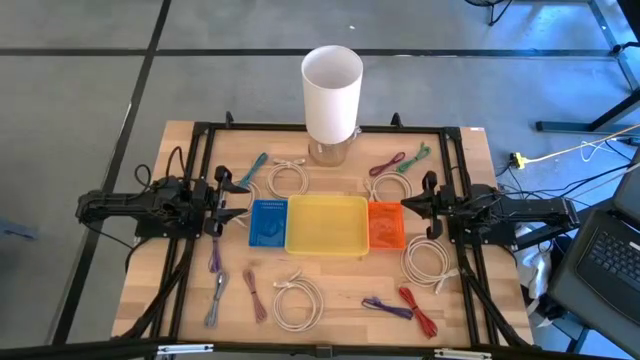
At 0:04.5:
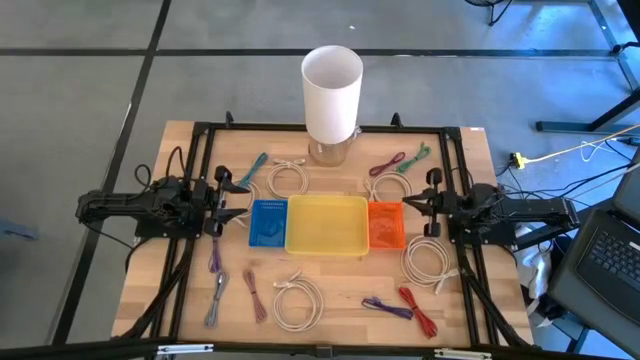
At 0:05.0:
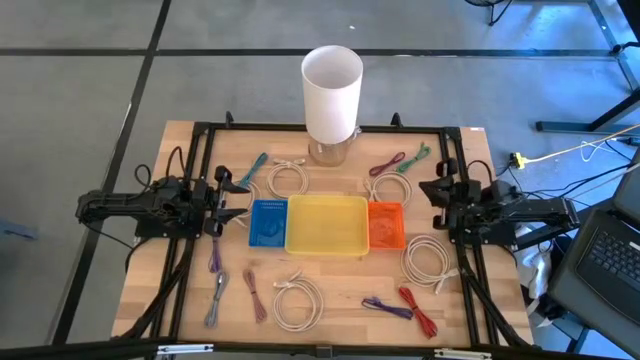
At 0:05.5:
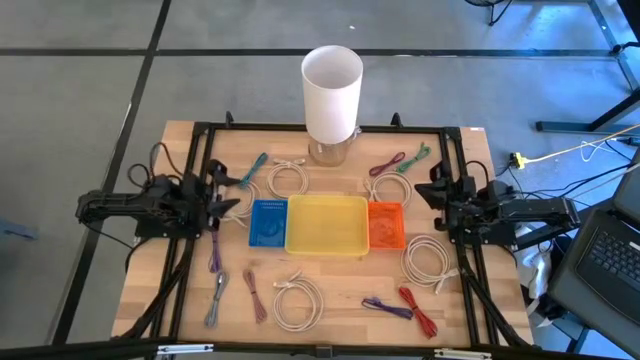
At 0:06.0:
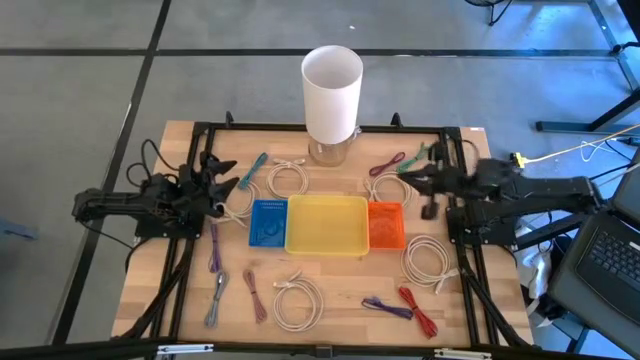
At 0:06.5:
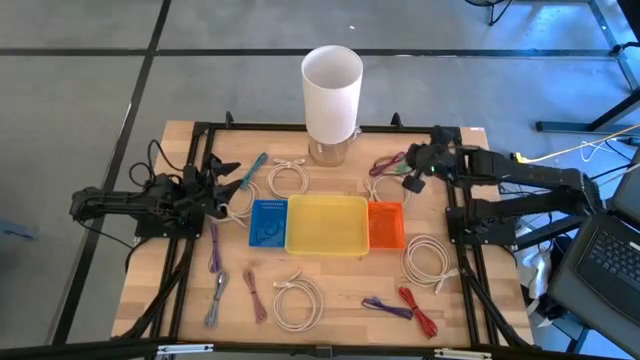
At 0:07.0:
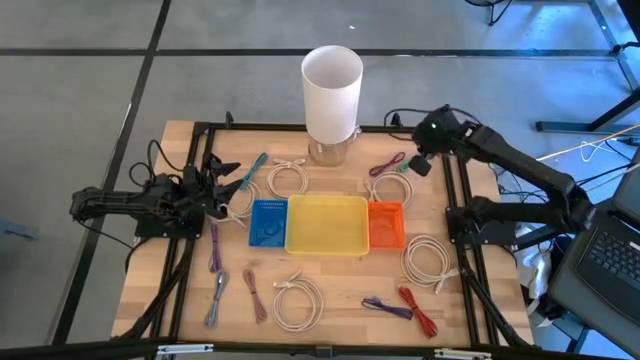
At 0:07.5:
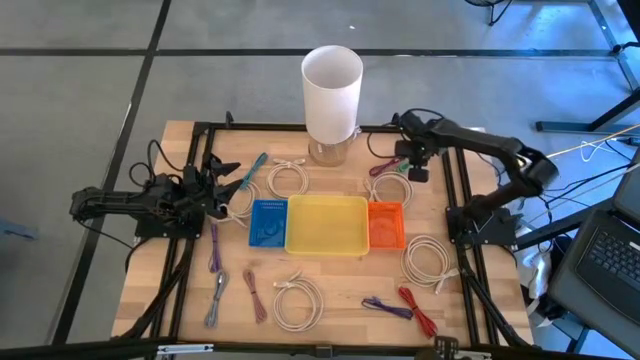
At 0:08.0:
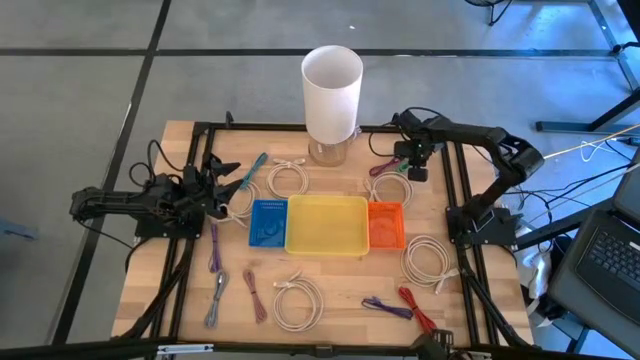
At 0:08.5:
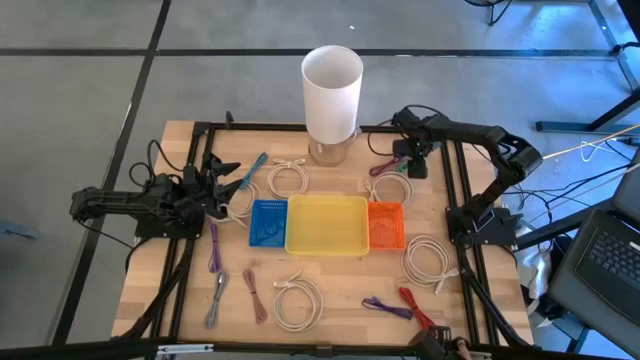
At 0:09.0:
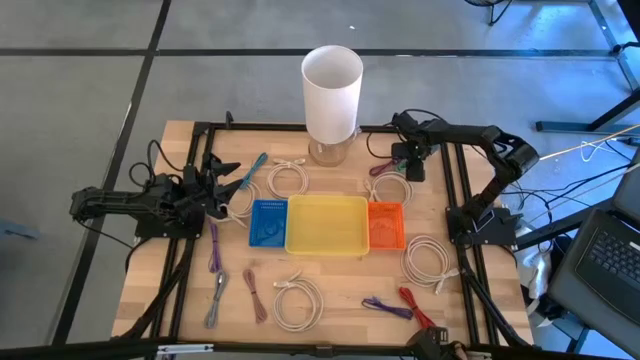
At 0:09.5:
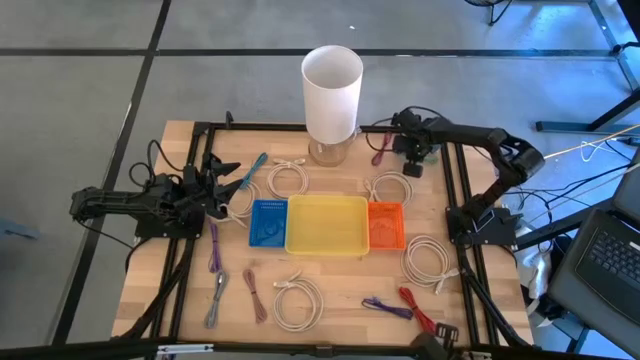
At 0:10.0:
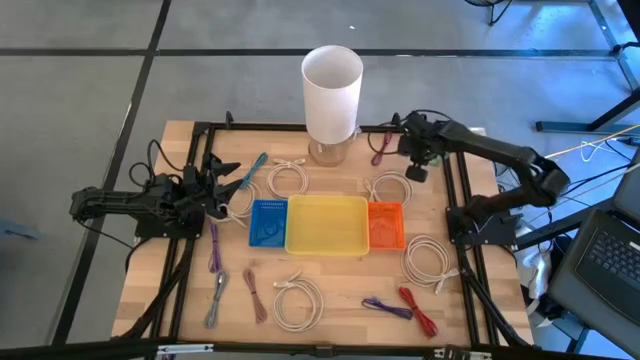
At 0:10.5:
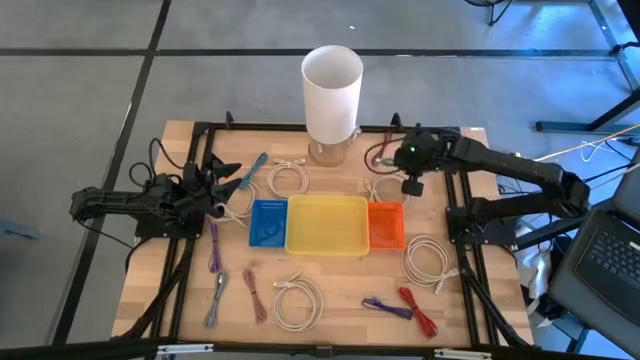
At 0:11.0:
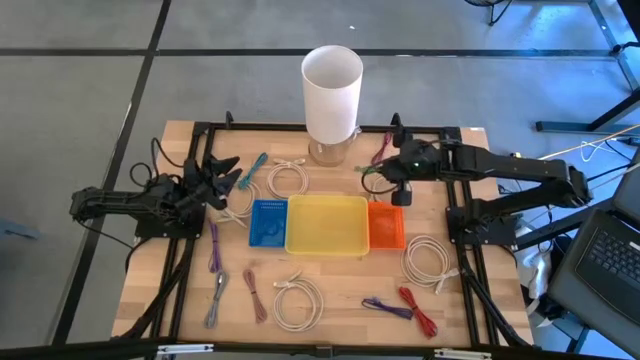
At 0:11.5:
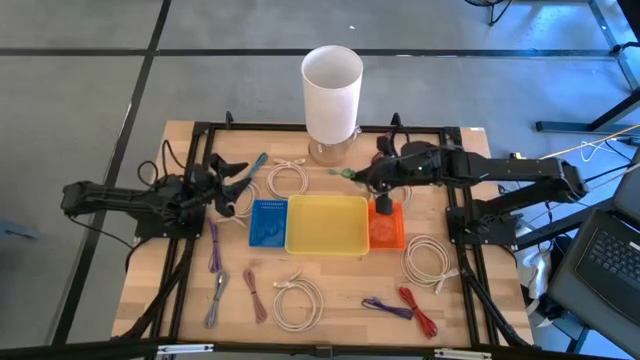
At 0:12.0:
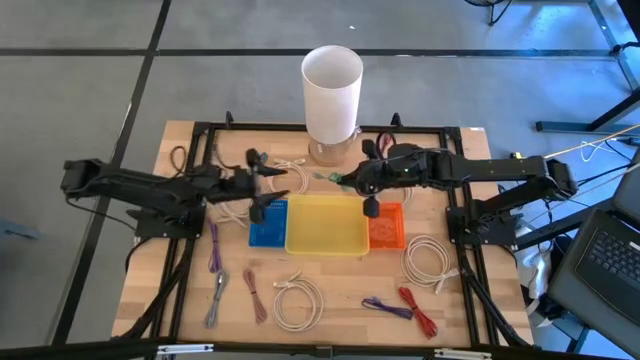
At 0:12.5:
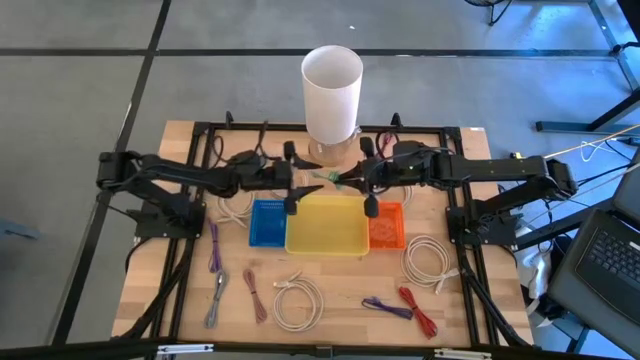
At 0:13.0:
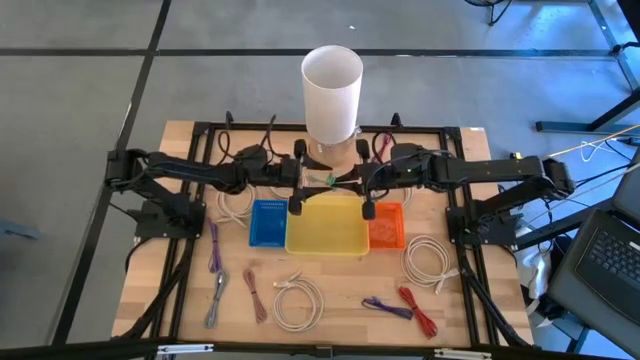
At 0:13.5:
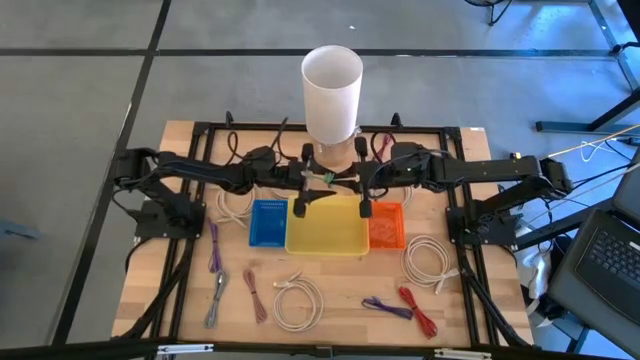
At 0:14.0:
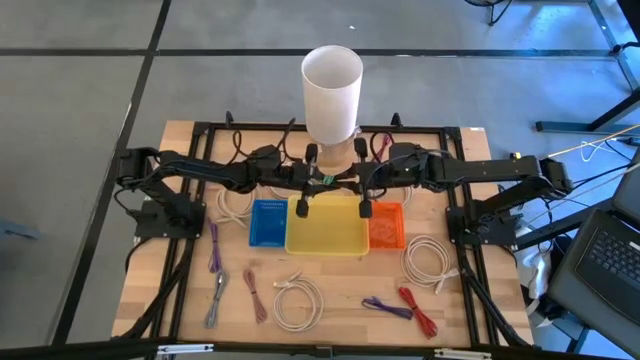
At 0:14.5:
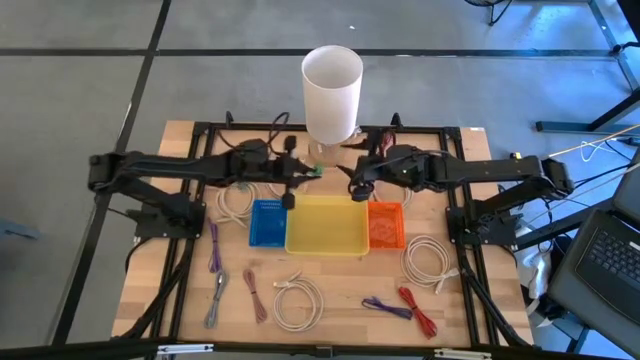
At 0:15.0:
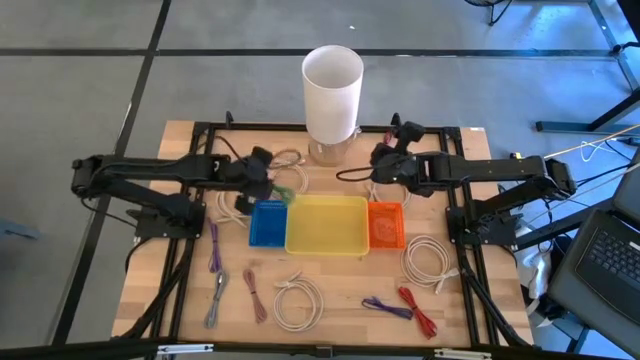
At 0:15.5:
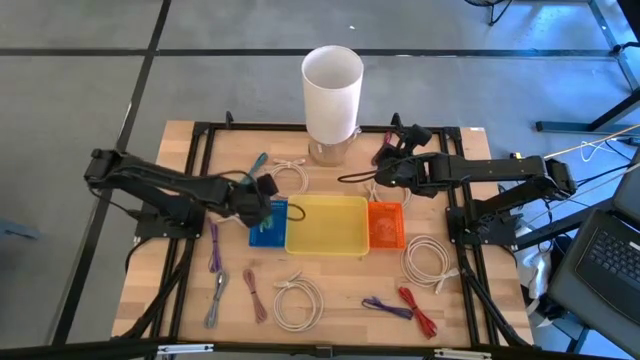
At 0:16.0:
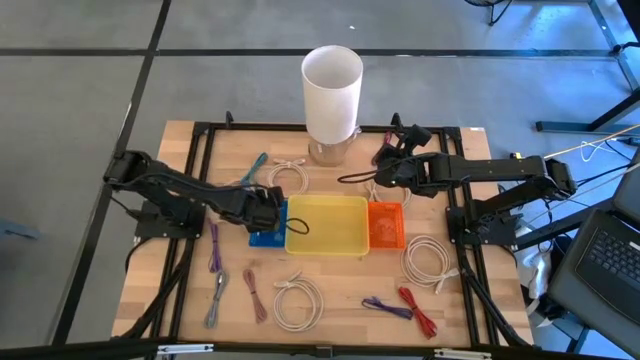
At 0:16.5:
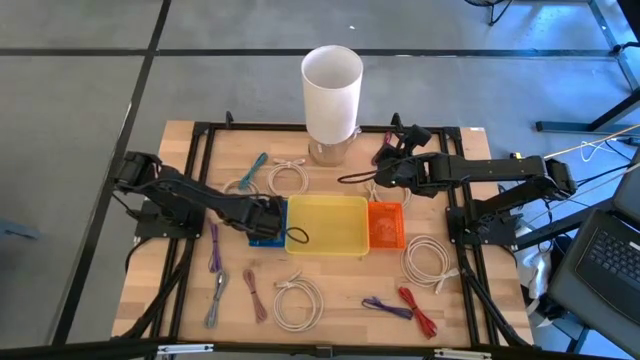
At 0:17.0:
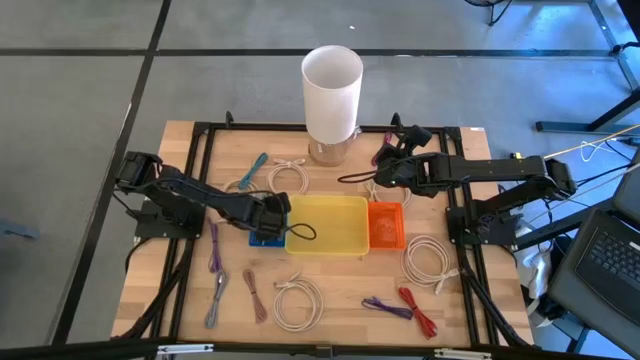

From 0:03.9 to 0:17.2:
Task: Pick & Place USB Port
Put the green USB cable into the blue bin

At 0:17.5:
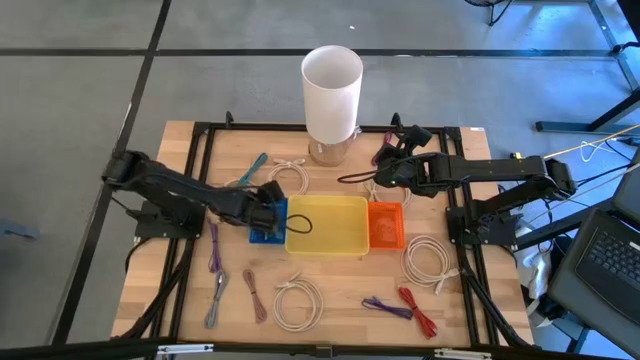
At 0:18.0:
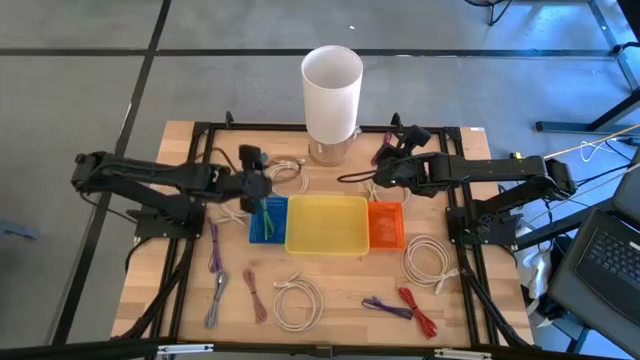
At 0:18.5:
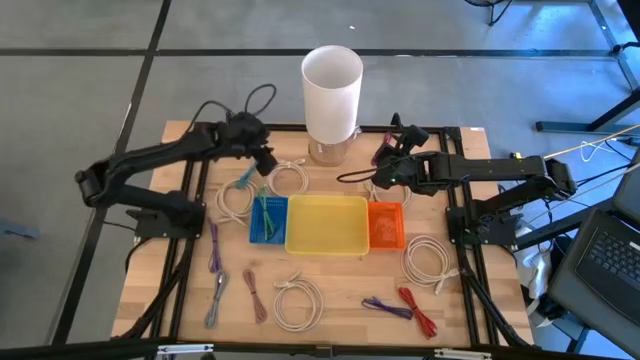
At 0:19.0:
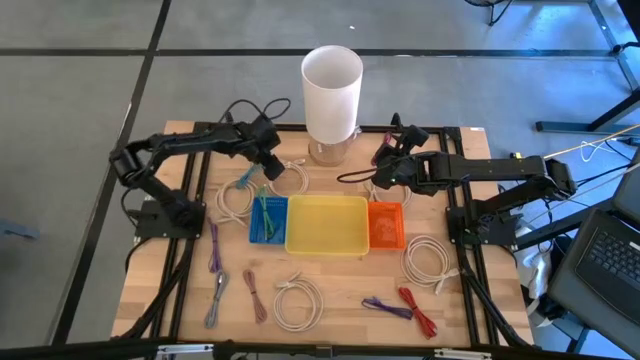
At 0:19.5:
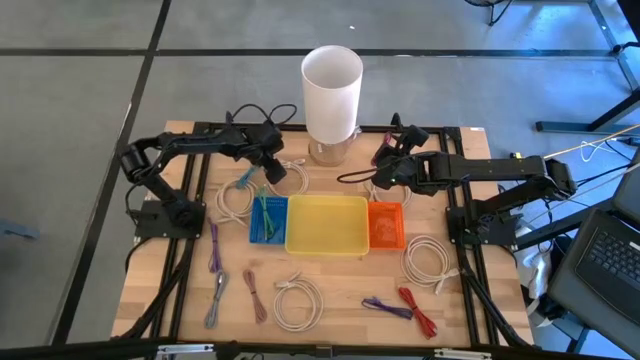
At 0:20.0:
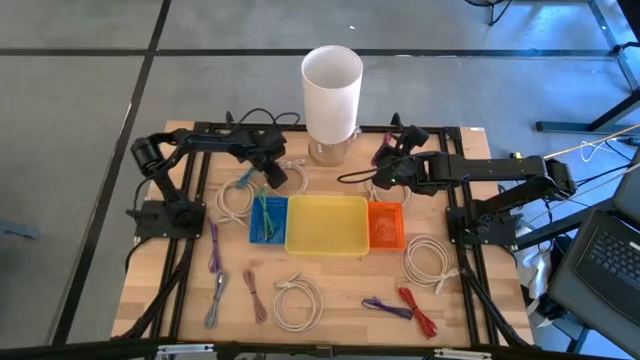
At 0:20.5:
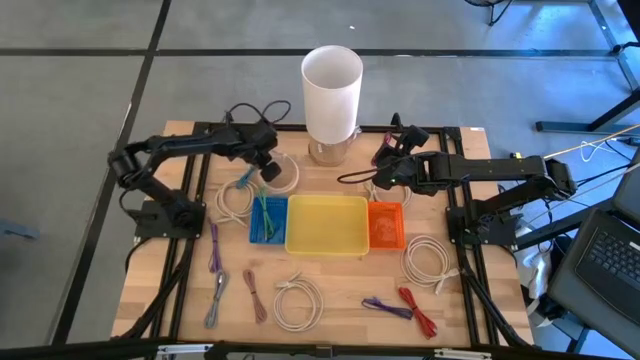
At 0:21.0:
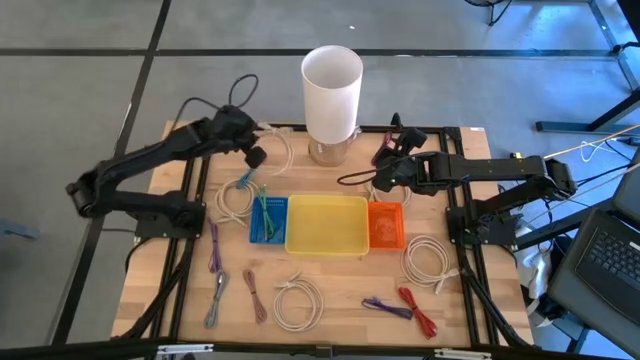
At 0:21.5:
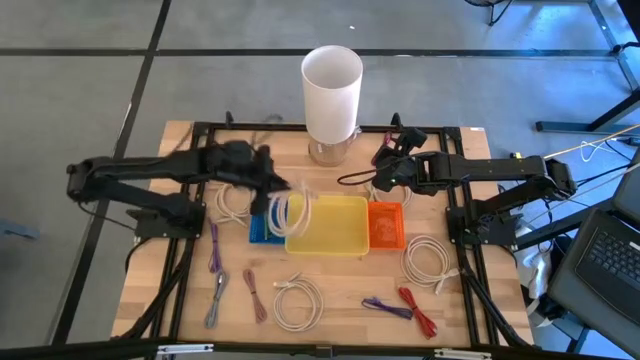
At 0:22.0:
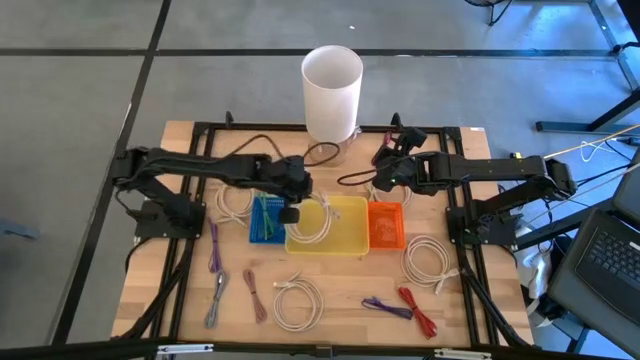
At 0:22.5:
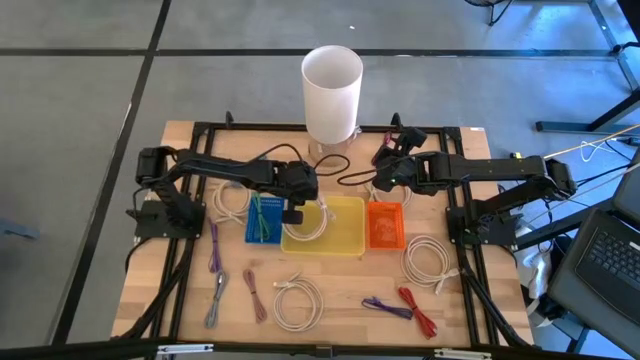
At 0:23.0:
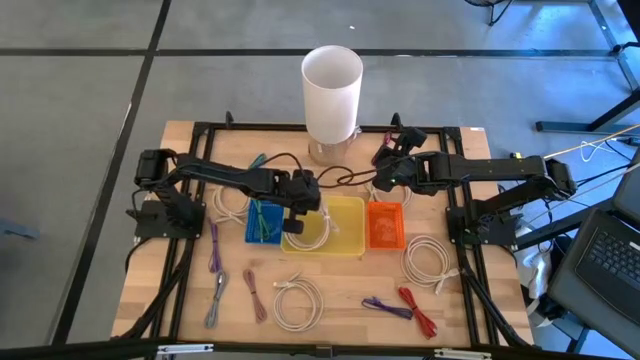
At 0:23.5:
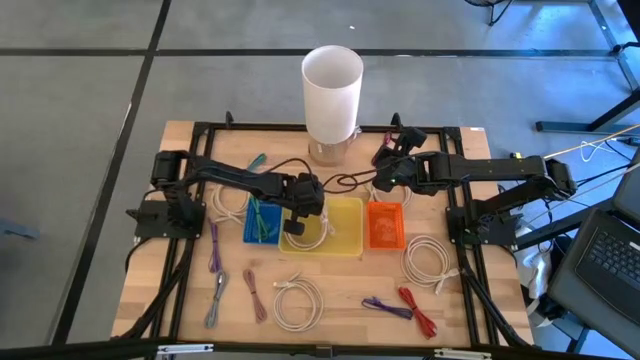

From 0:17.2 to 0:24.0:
Put the light brown HDMI cable into the yellow bin

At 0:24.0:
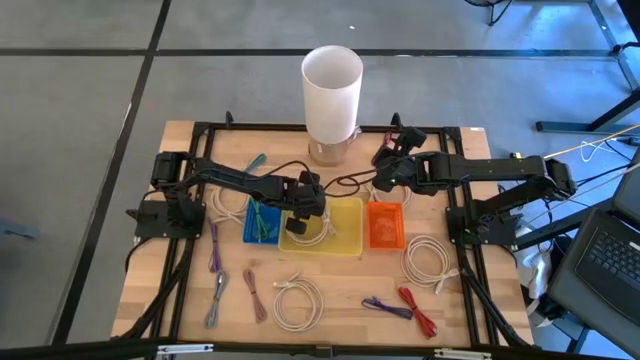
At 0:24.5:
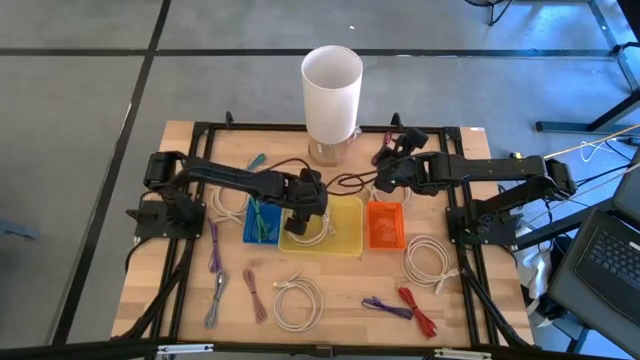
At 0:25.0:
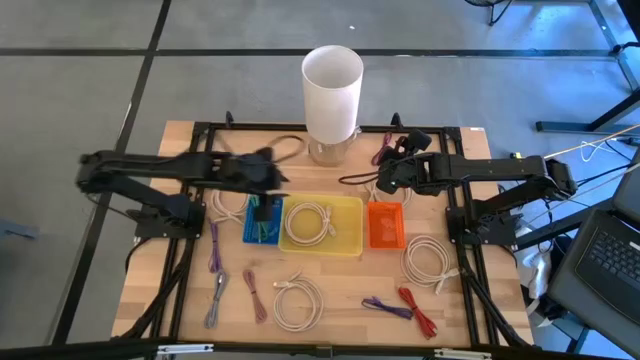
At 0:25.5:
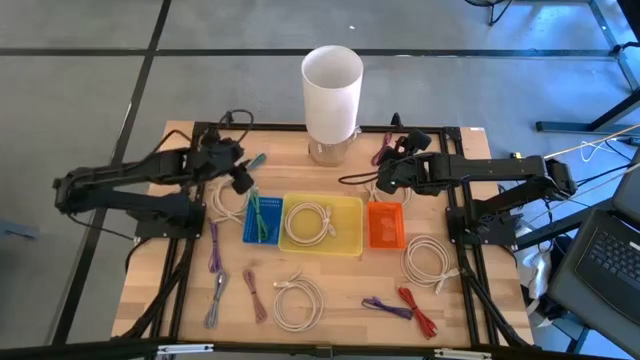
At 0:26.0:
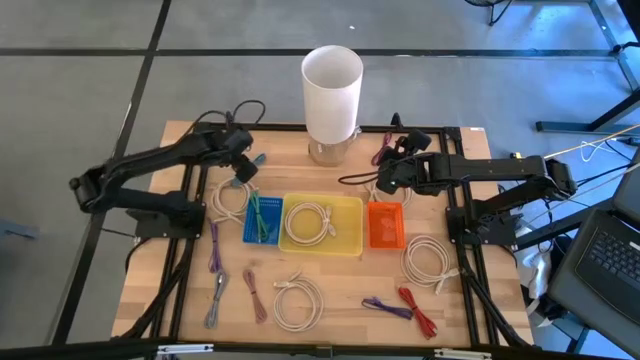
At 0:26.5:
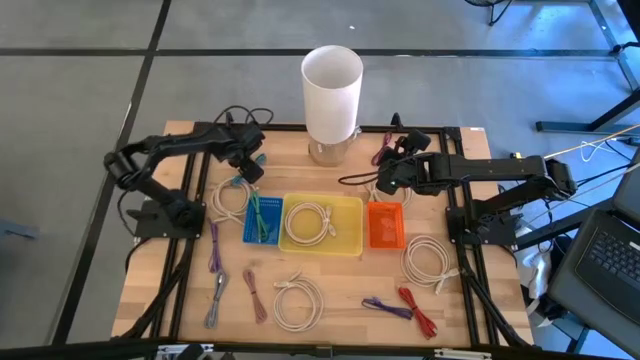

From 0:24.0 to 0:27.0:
Put the blue patterned USB cable into the orange bin
